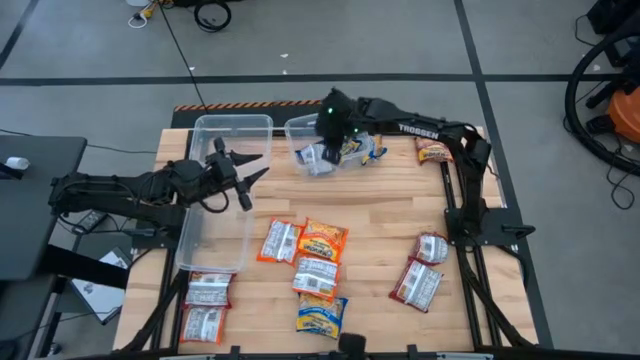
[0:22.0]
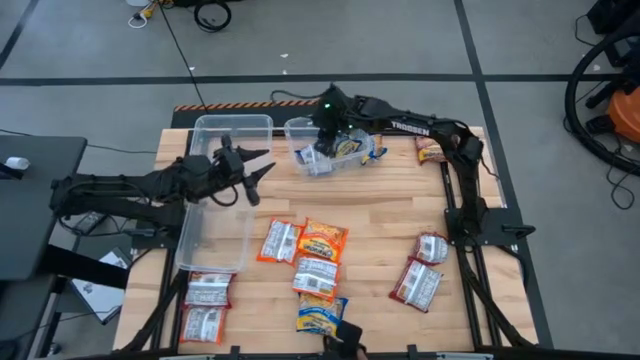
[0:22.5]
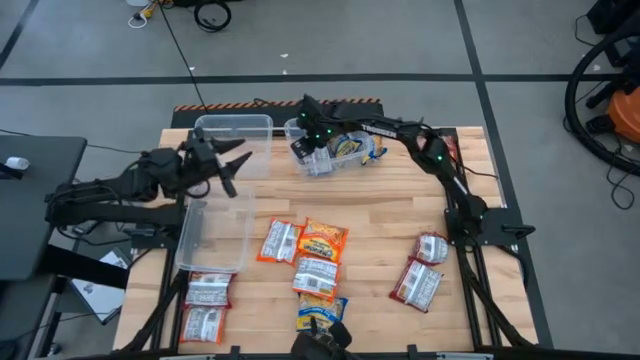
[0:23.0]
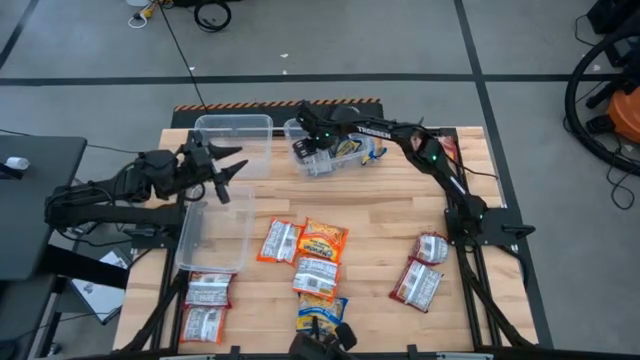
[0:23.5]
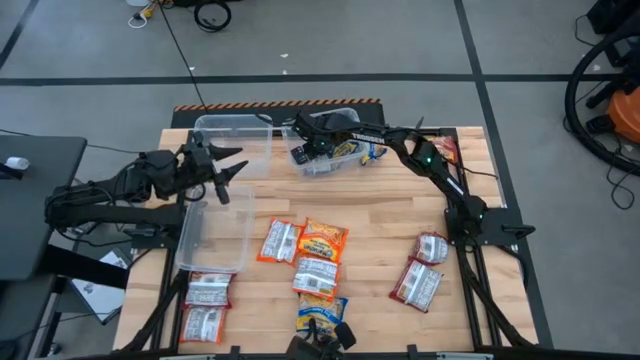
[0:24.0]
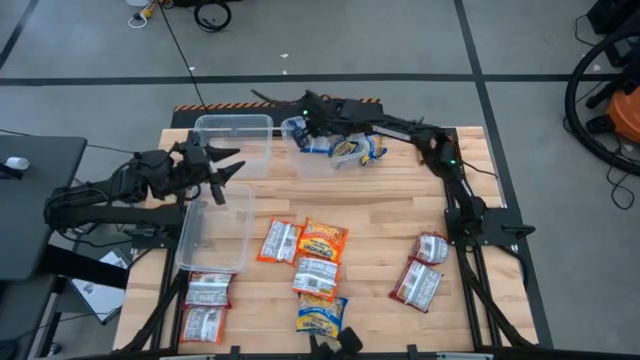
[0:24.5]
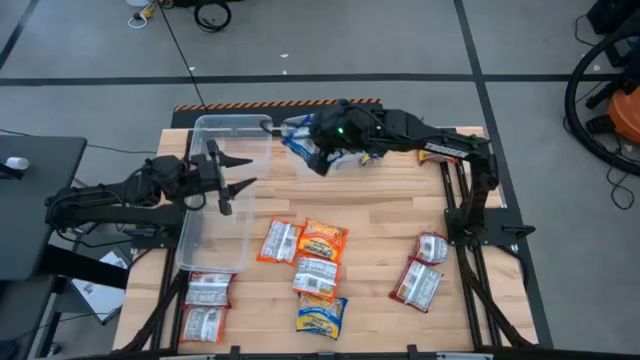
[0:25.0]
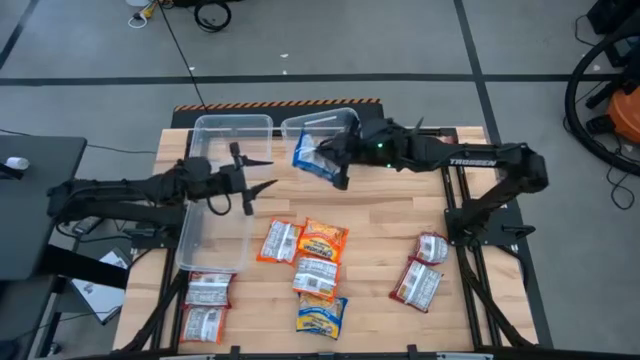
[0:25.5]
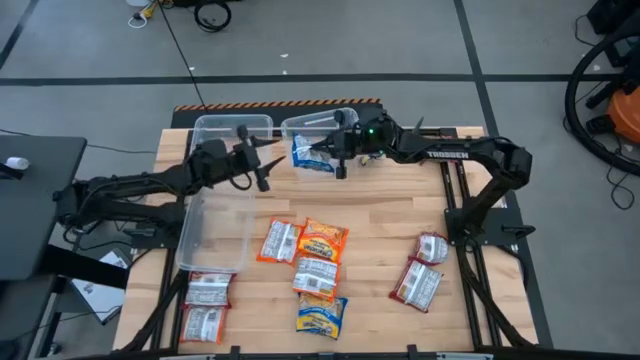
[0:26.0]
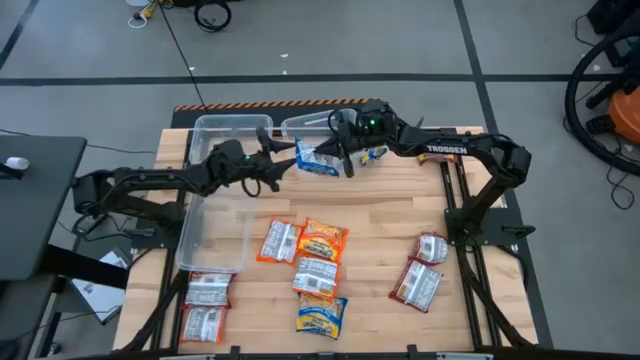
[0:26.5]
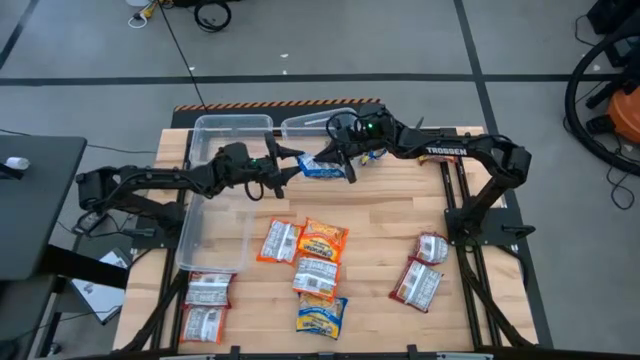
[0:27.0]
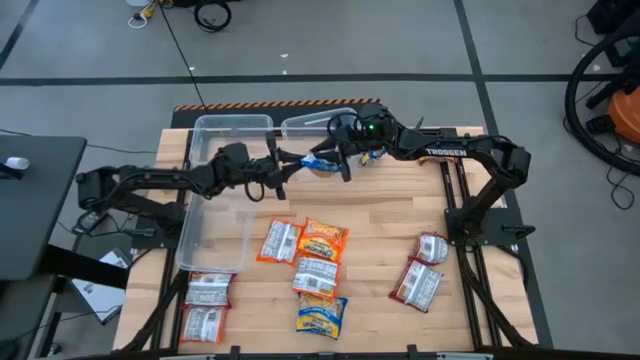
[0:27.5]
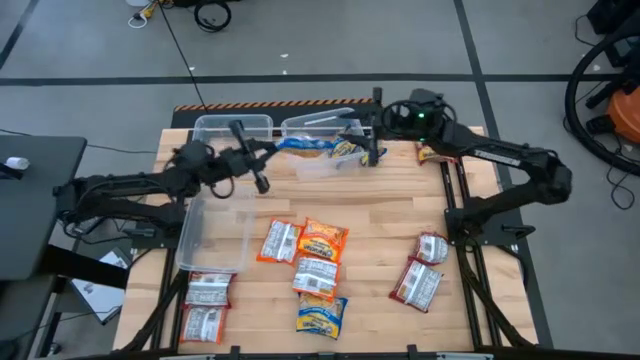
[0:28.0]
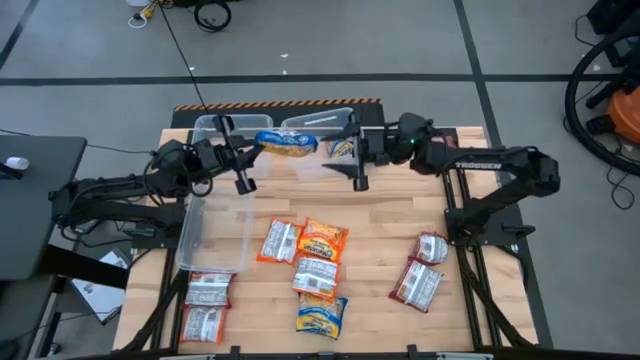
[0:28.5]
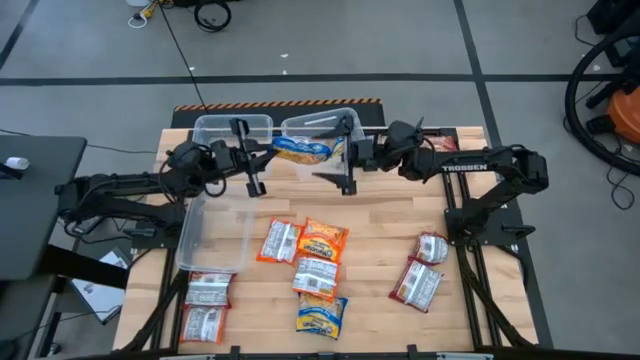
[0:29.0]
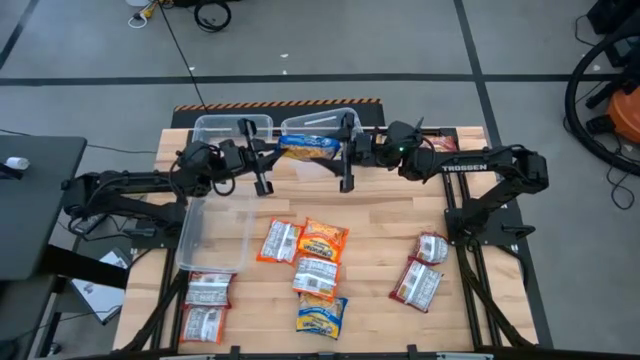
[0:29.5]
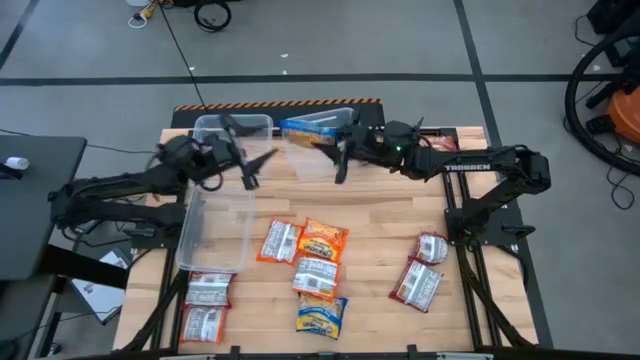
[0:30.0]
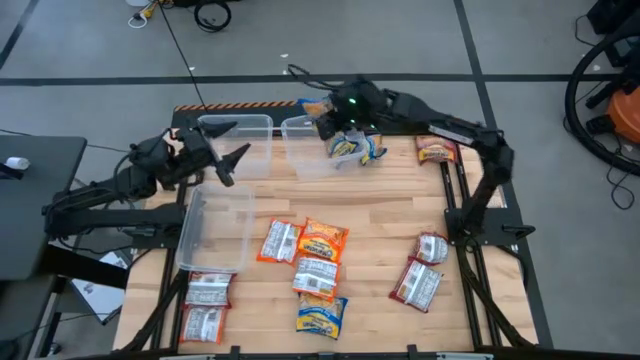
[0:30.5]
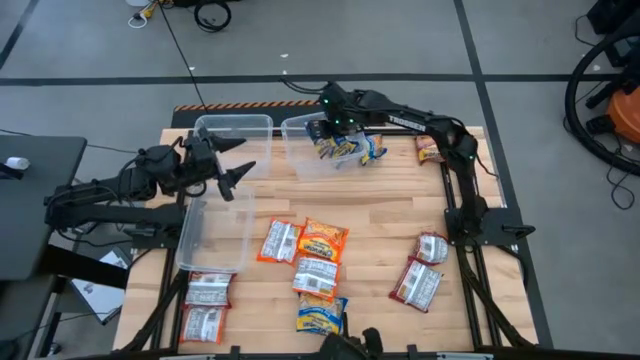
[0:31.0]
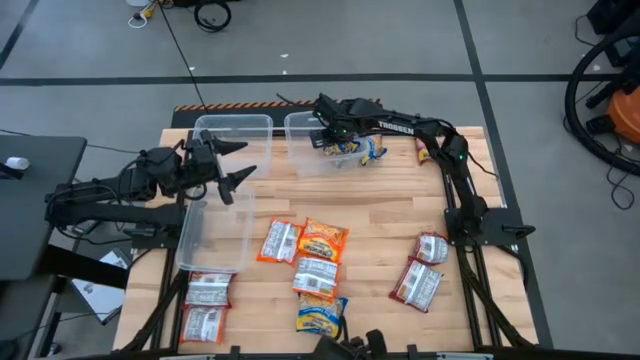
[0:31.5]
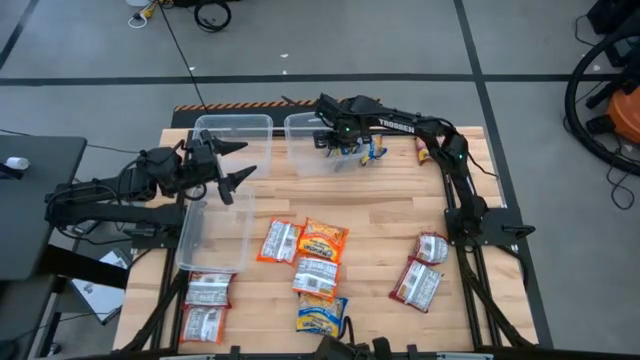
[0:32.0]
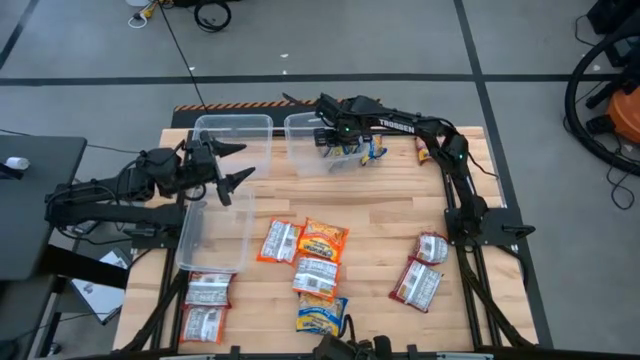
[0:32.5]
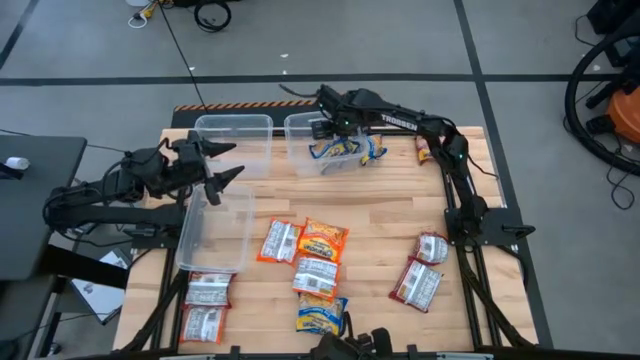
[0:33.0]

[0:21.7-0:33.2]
Task: Sort Maruchan noodles
Put the top right blue noodle pack into the top right transparent bin

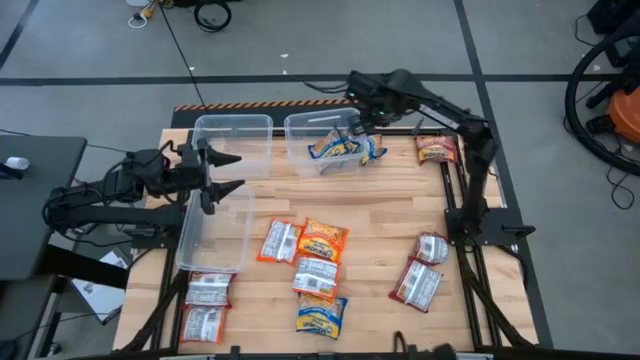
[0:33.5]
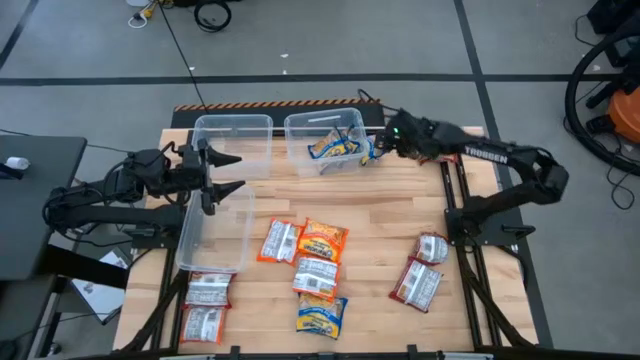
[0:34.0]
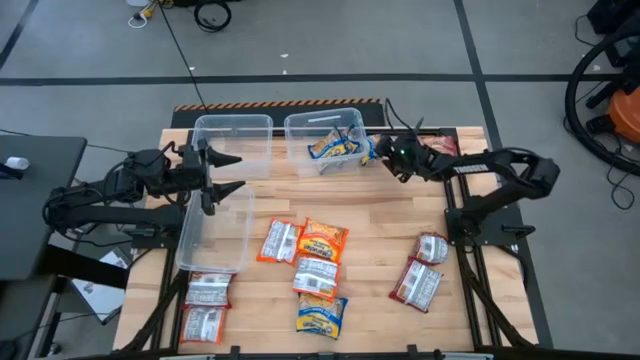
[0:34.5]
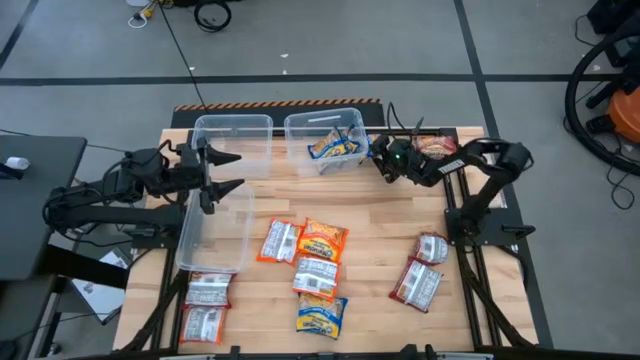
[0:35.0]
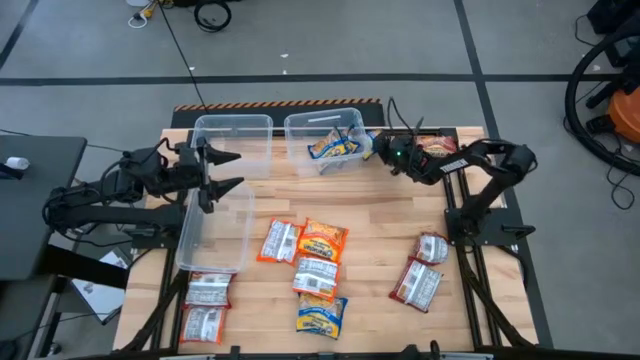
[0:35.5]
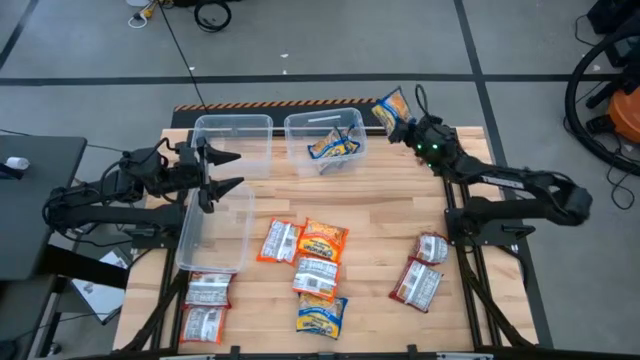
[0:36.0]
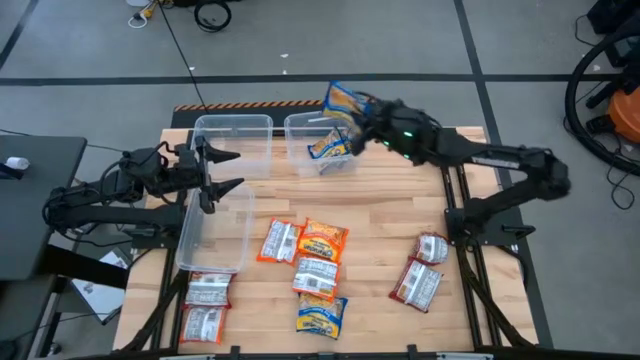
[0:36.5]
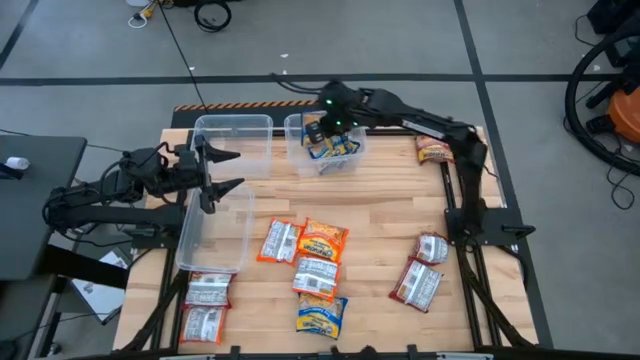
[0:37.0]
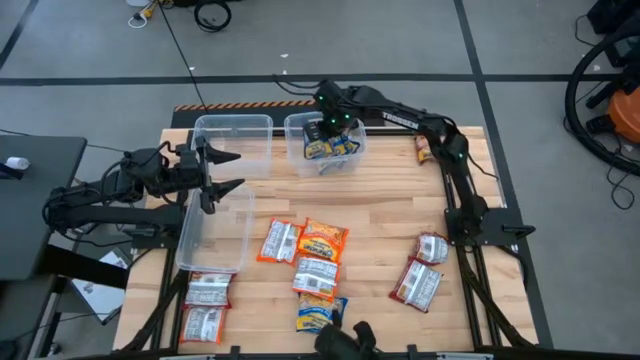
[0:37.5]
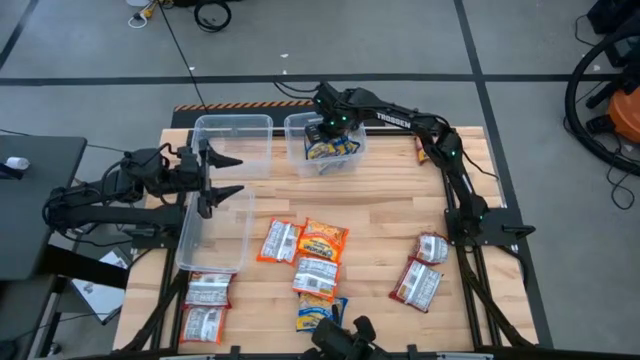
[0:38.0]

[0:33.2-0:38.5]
Put the top blue noodle pack into the top right transparent bin

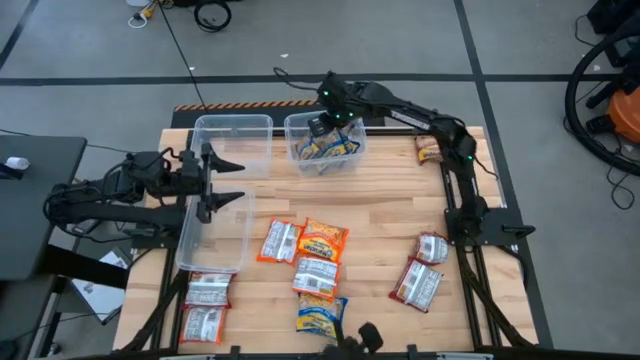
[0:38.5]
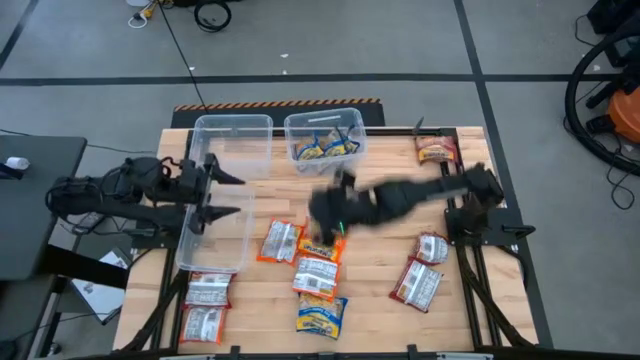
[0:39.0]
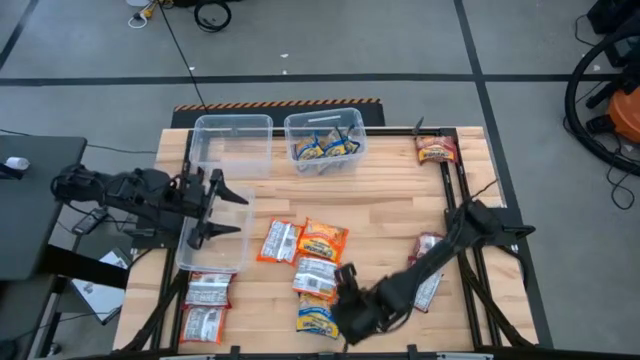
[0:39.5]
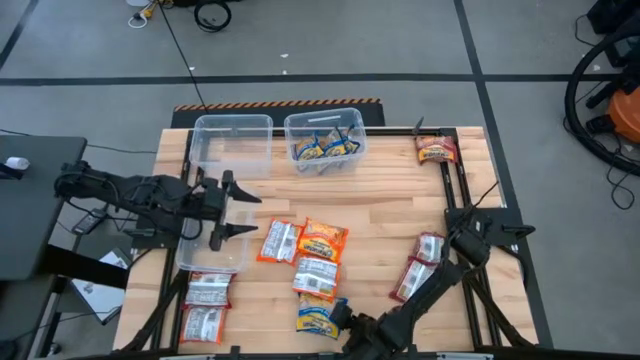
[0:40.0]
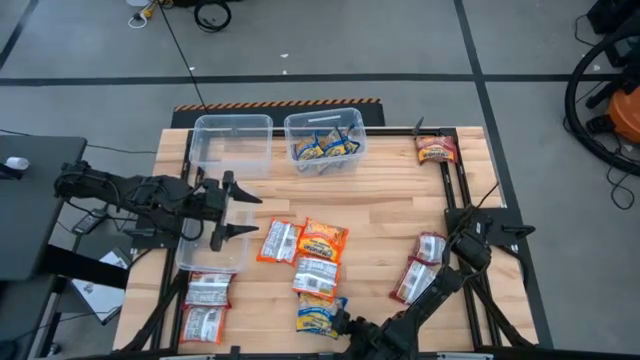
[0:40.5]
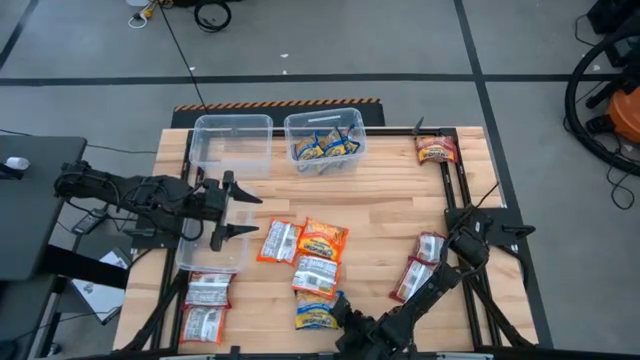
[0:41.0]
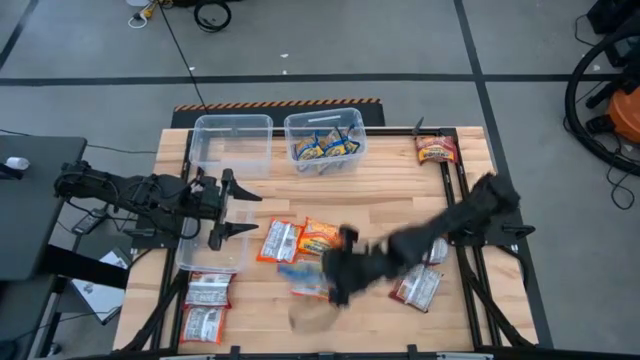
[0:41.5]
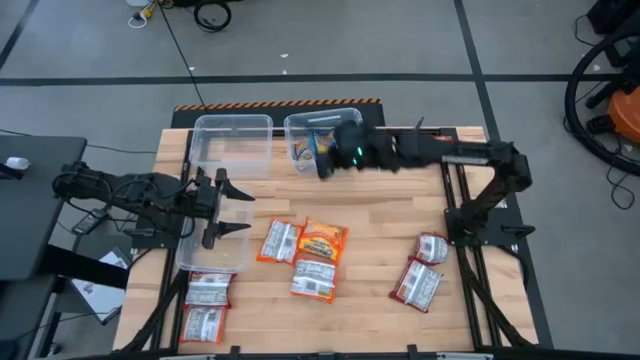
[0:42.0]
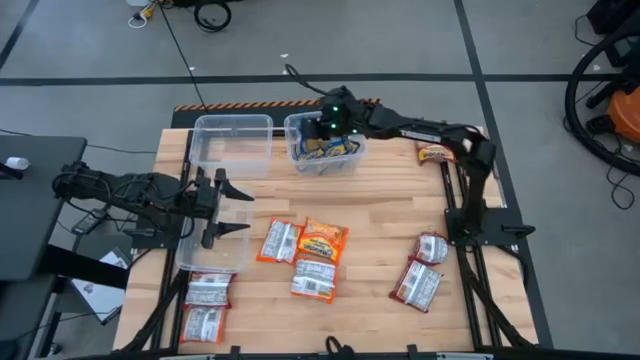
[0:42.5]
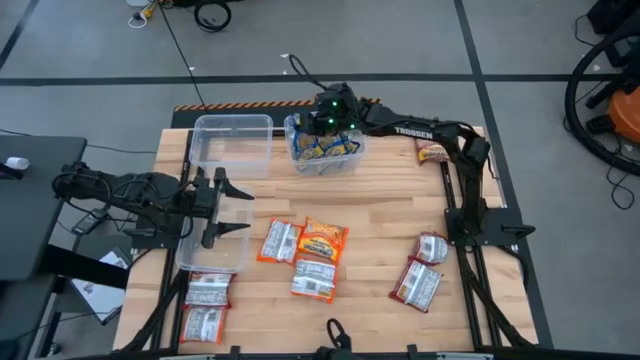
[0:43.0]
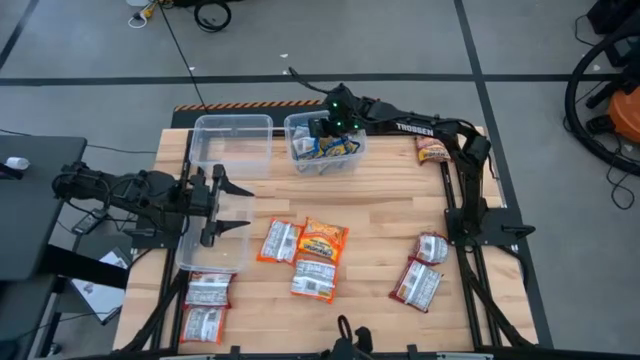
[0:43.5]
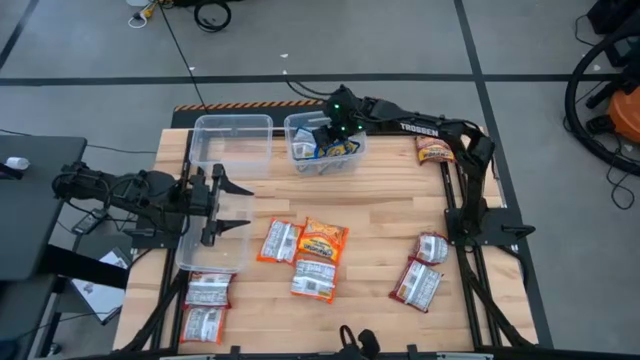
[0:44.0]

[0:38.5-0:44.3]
Put the blue noodle pack into the top right transparent bin
